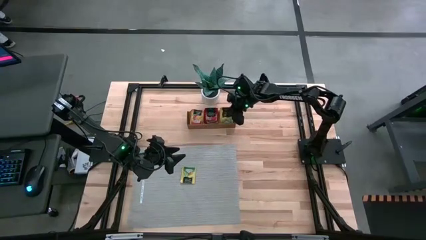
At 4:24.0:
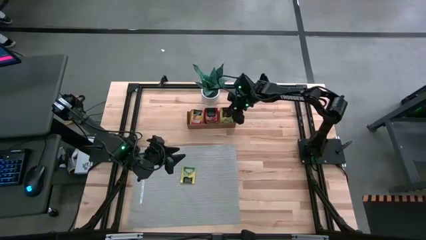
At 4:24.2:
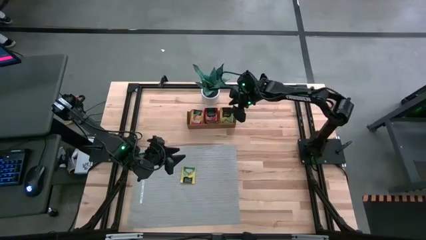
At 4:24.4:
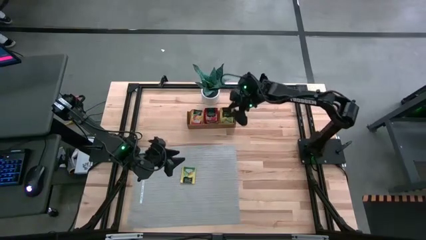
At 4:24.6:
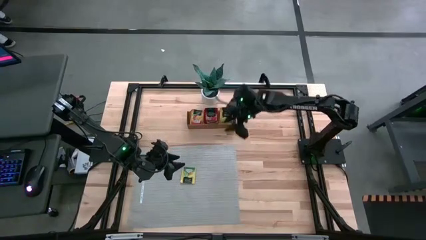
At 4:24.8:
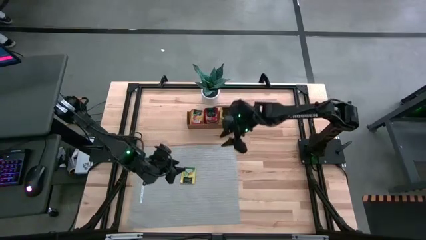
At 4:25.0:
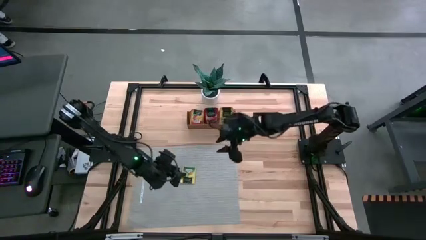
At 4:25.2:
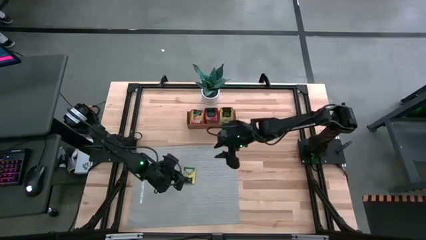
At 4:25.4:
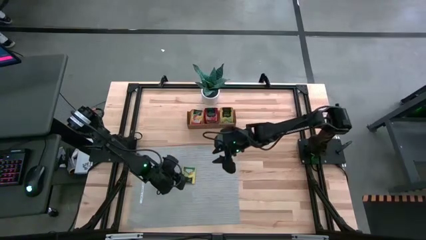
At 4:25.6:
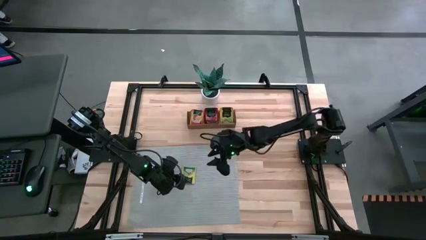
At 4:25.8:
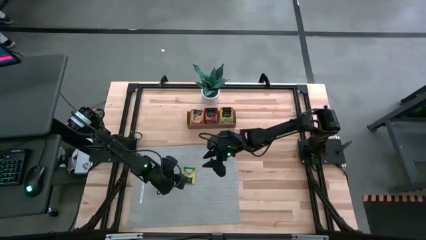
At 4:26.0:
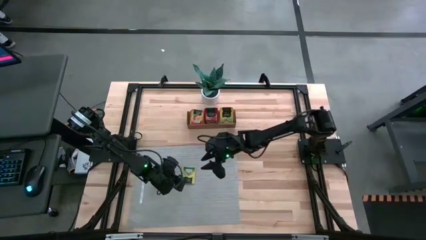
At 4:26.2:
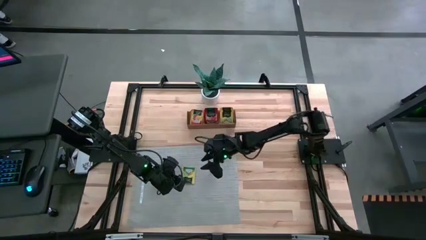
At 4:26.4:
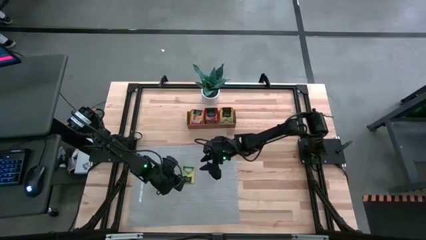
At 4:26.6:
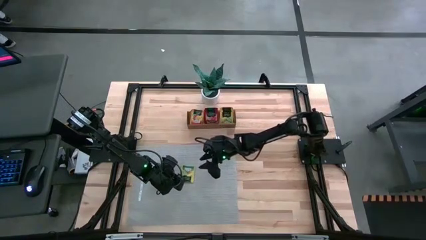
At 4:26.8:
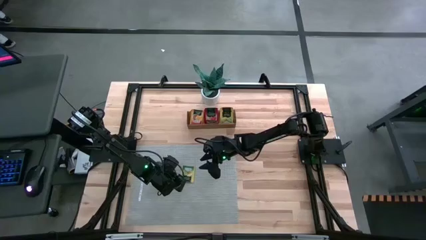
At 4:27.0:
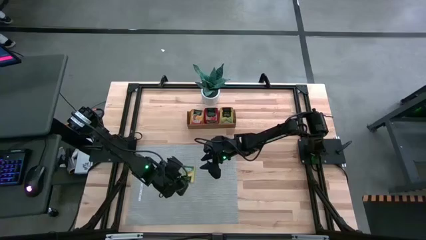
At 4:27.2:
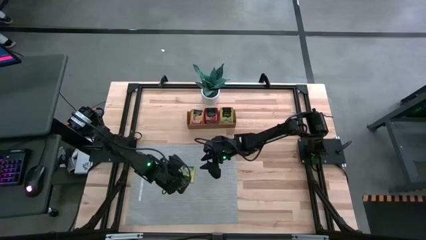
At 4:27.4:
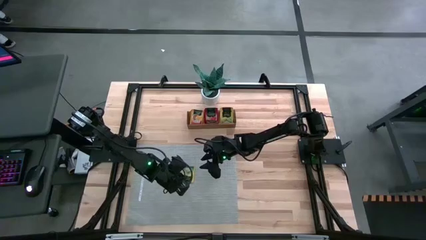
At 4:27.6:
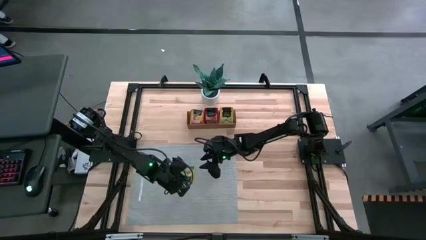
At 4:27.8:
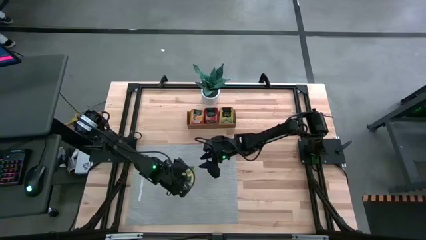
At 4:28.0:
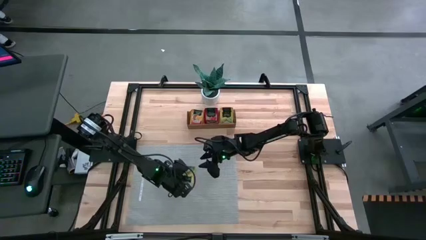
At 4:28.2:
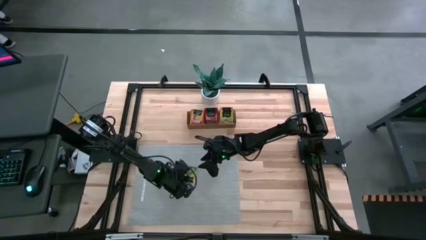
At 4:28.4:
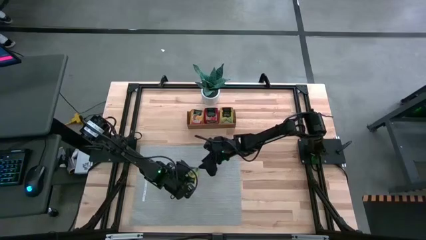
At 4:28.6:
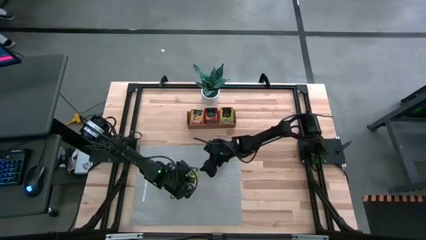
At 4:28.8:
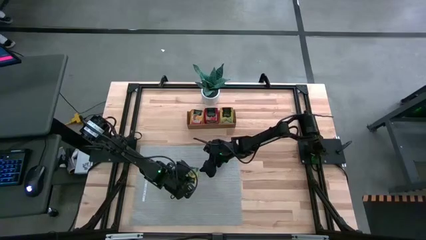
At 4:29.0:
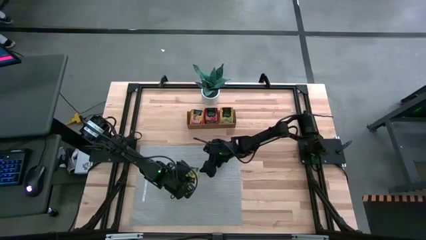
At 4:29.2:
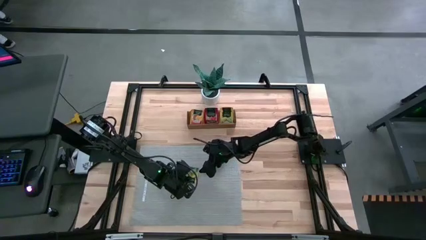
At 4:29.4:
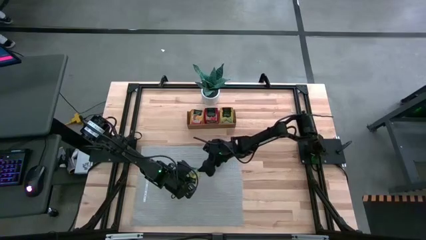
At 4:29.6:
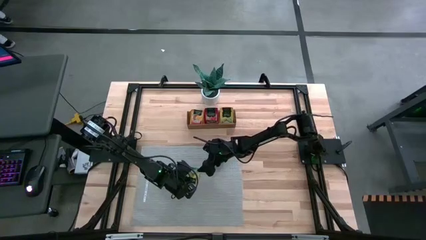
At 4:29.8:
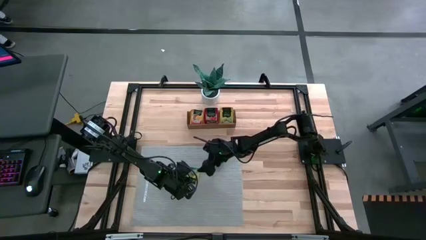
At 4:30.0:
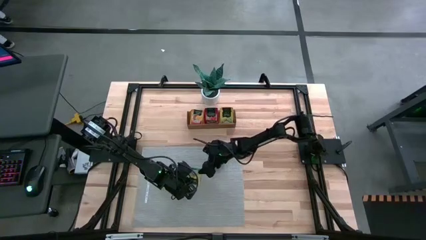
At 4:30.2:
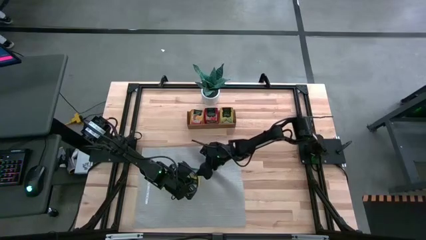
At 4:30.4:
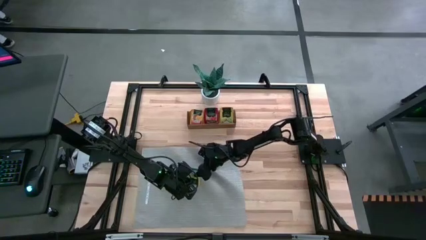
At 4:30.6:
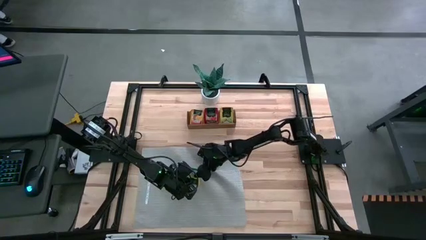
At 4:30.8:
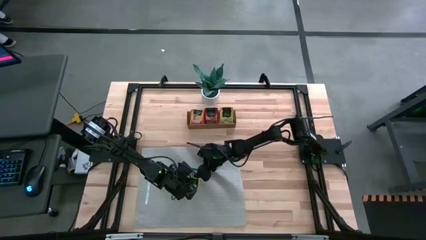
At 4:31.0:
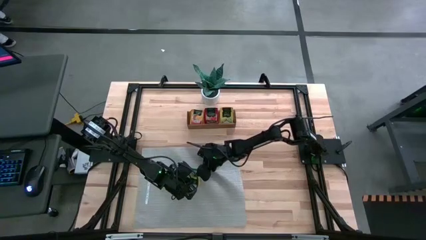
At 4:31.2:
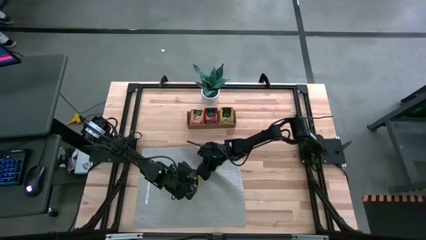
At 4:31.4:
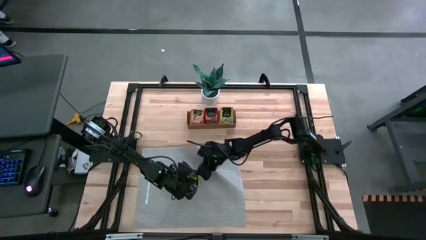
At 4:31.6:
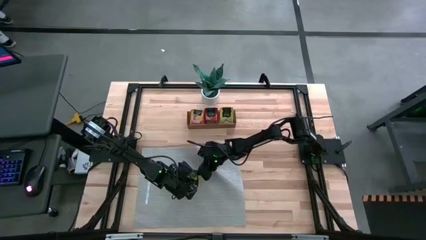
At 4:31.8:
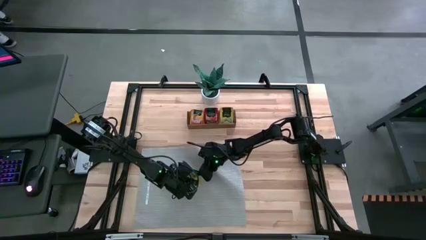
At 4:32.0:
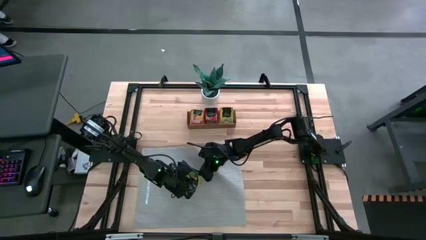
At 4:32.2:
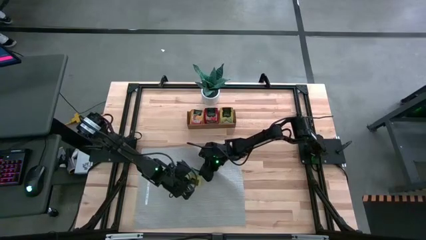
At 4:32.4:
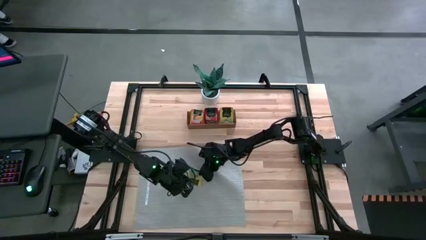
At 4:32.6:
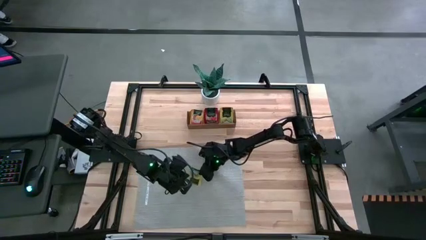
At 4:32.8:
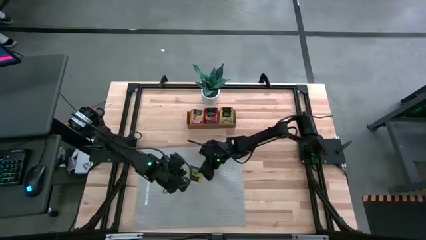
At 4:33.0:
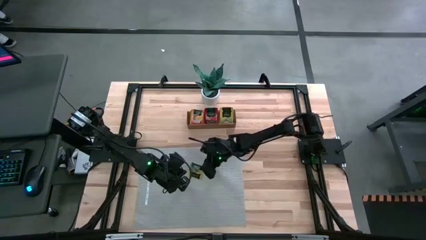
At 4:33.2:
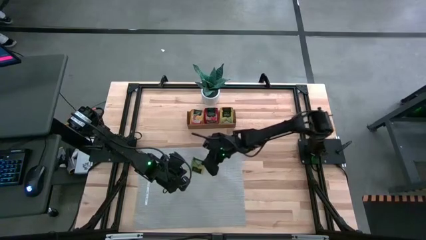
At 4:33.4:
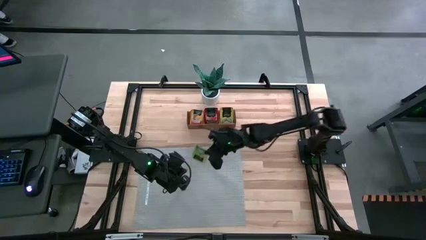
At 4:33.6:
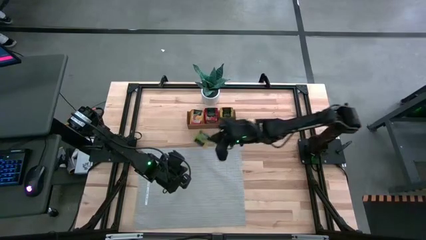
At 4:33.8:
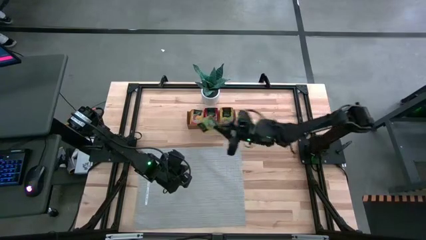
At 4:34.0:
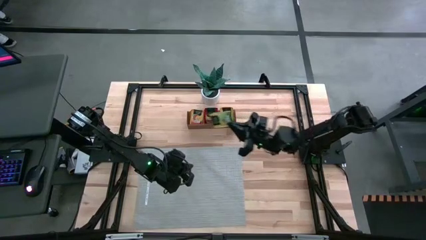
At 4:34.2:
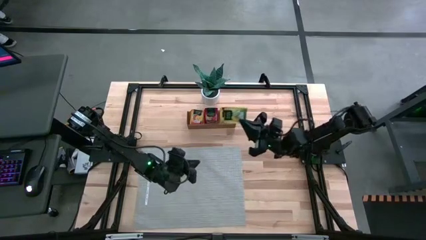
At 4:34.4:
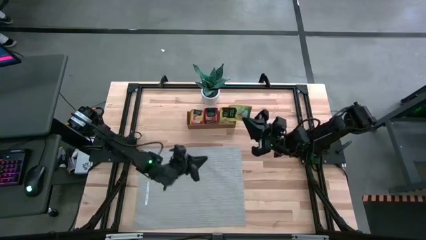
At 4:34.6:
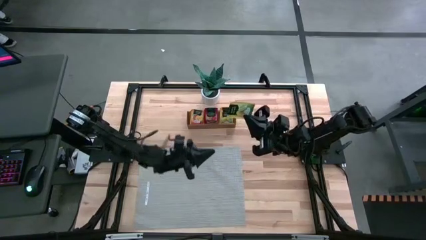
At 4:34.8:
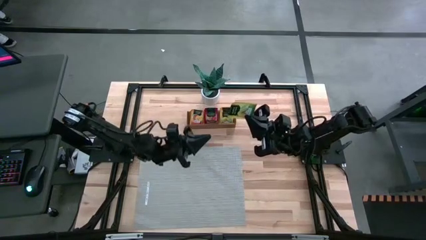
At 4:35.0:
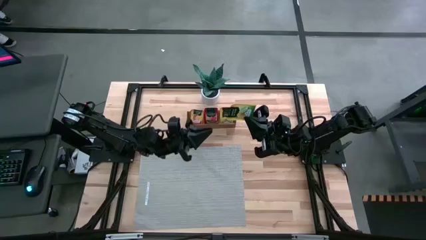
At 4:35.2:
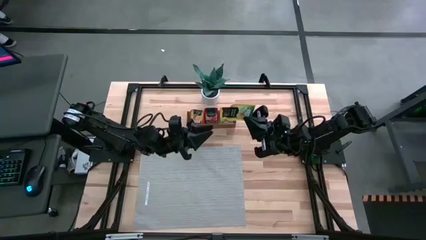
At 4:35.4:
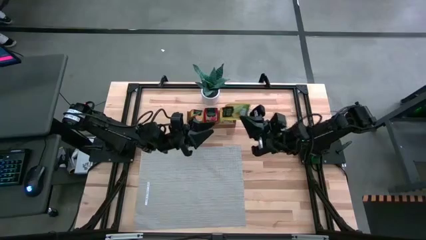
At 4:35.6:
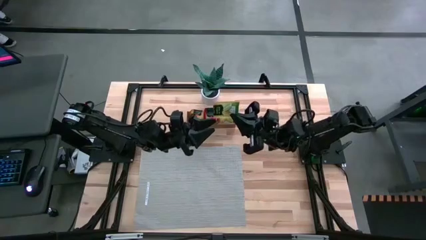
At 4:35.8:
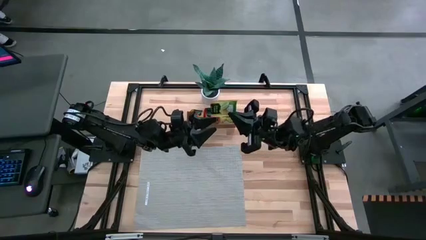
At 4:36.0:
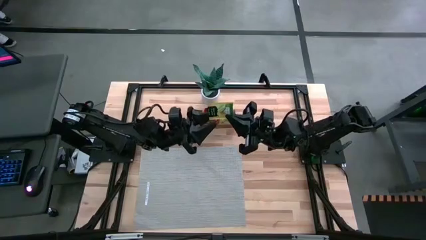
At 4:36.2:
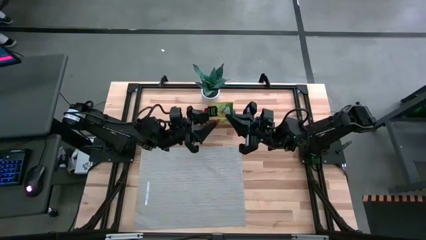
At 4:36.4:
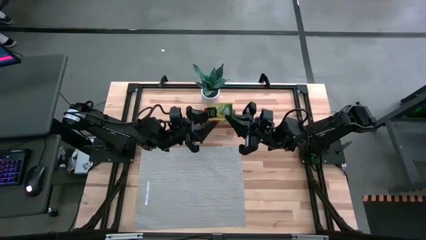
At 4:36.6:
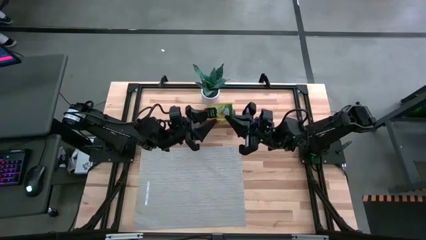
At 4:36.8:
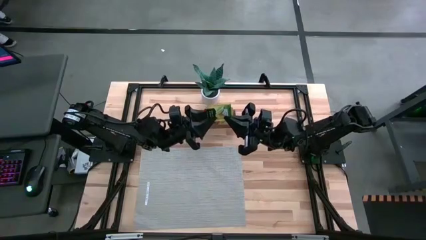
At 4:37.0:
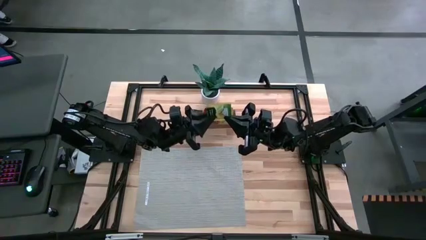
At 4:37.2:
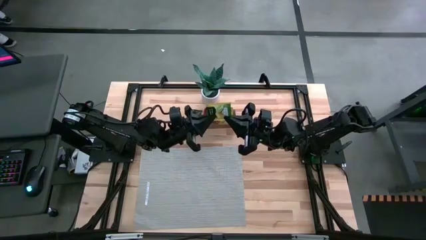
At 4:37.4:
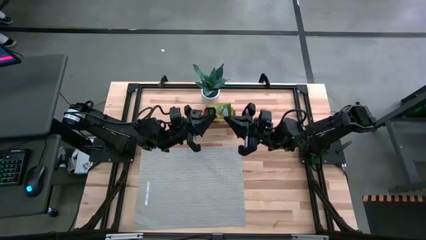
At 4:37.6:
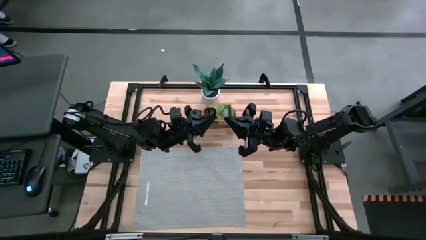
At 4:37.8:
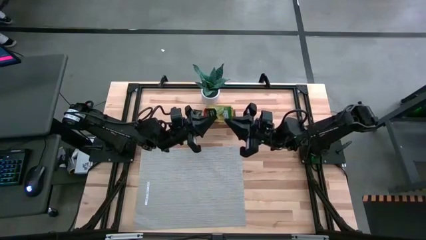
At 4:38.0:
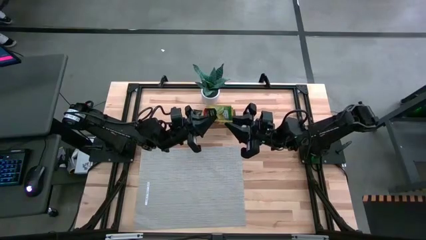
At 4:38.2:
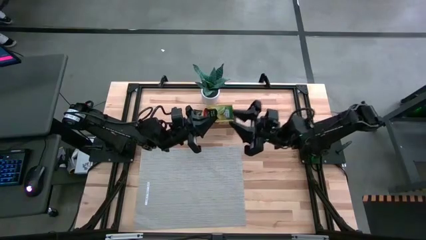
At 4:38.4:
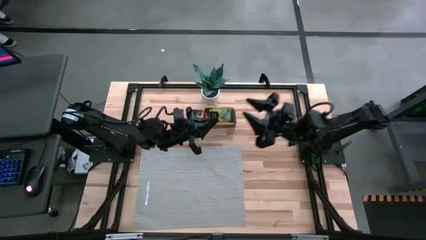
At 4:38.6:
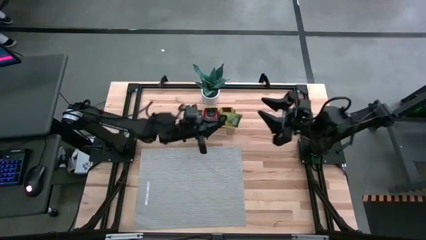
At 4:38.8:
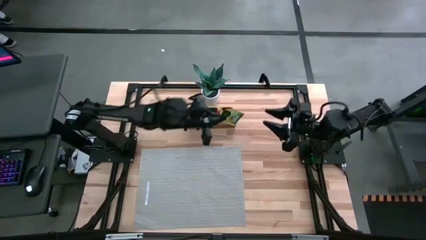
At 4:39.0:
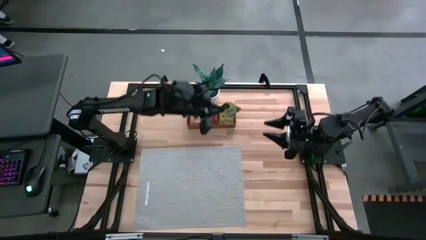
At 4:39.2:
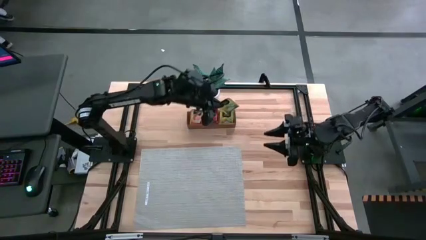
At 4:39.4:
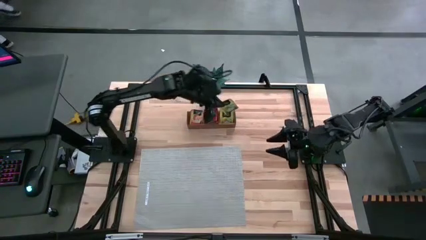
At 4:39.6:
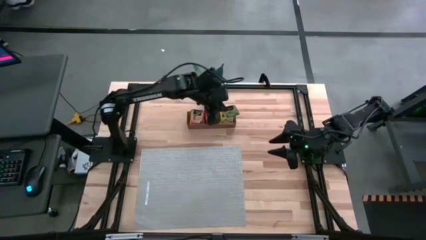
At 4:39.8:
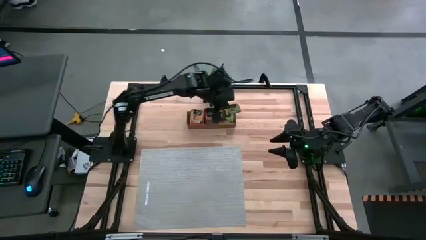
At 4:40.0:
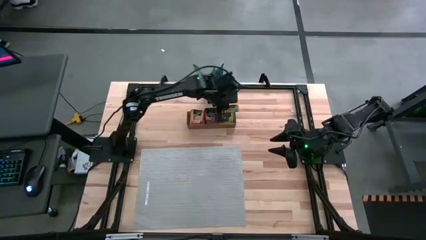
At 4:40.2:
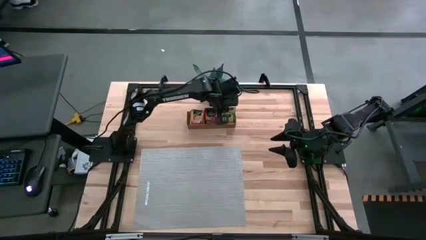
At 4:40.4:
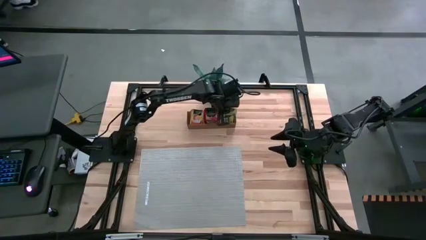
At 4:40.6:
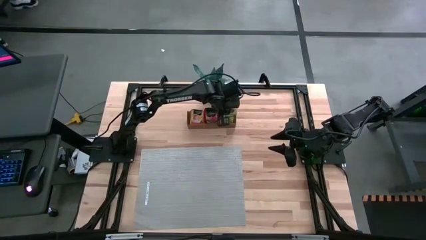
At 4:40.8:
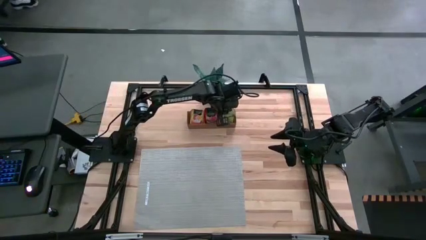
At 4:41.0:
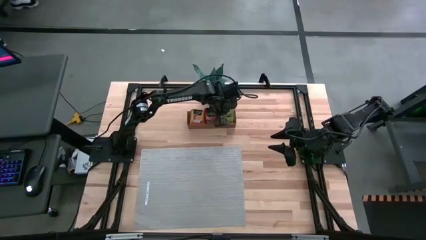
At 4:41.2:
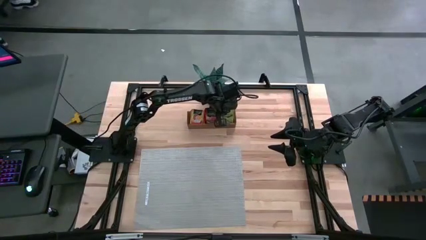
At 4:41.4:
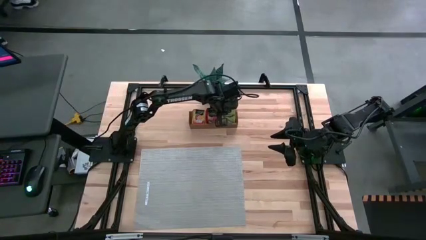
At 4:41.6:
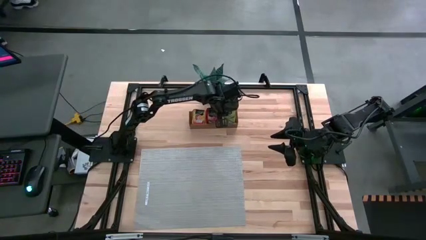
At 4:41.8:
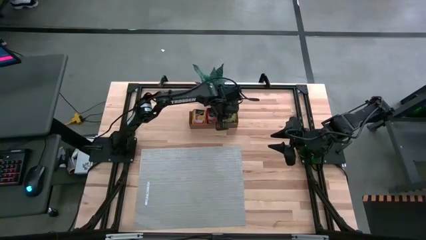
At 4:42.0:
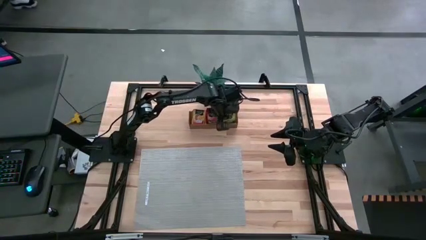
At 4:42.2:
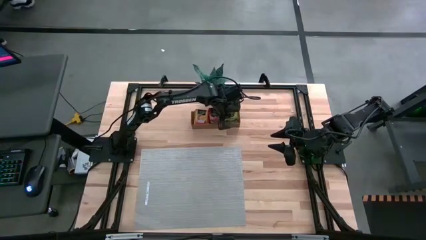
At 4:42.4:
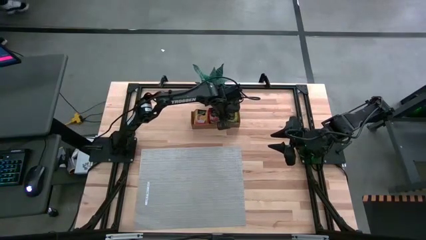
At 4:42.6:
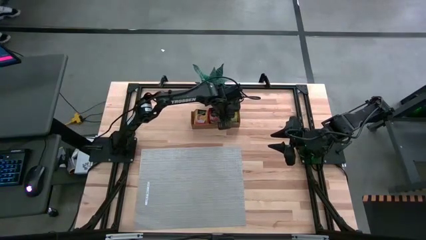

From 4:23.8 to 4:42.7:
Task: Pick & Place Tea
Put the yellow tea bag into the right section of the wooden organizer
